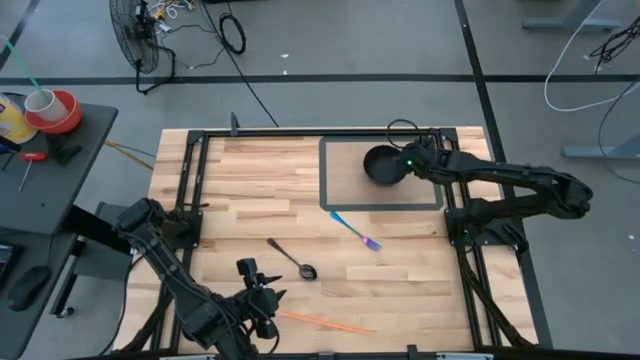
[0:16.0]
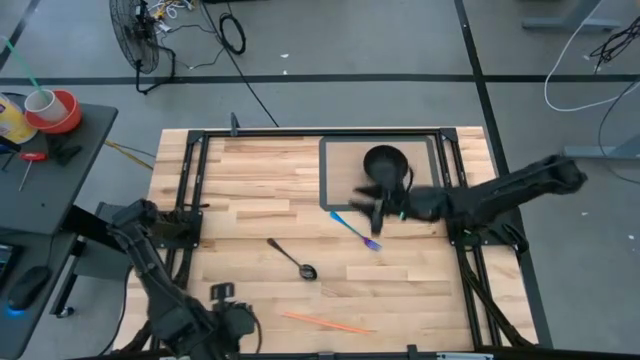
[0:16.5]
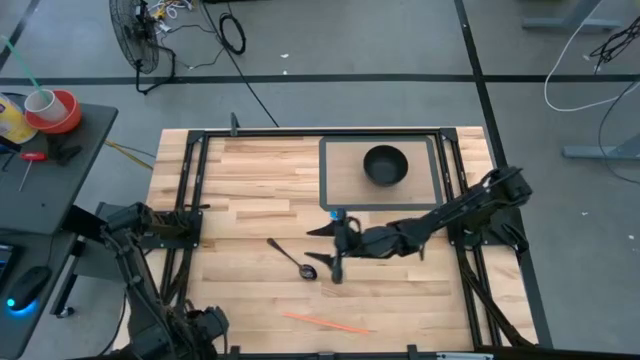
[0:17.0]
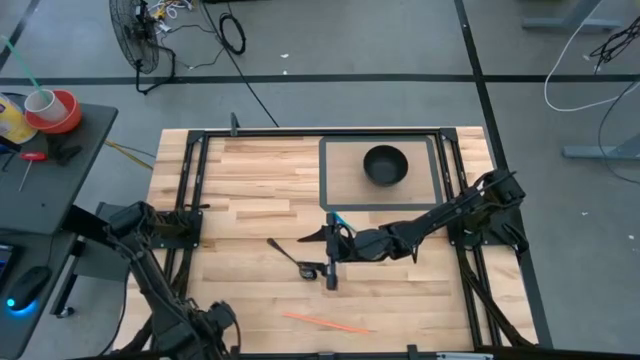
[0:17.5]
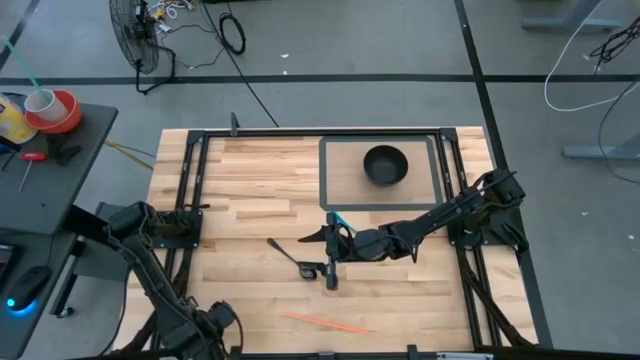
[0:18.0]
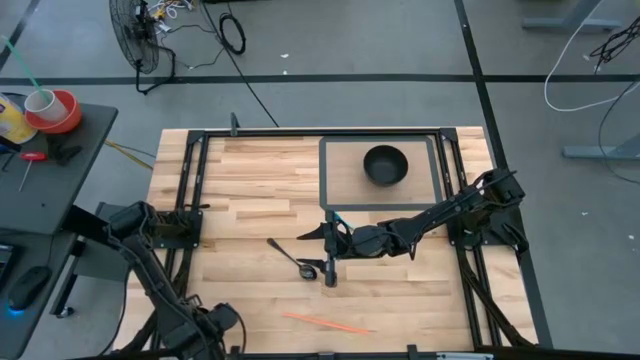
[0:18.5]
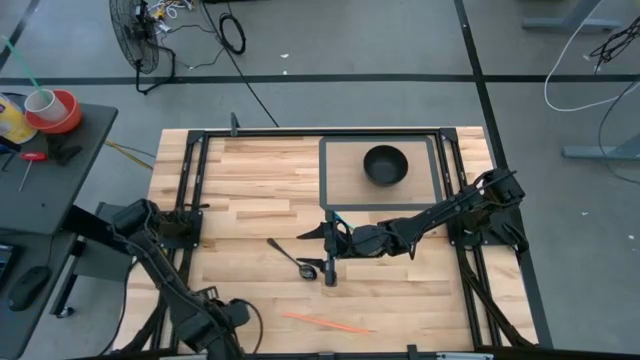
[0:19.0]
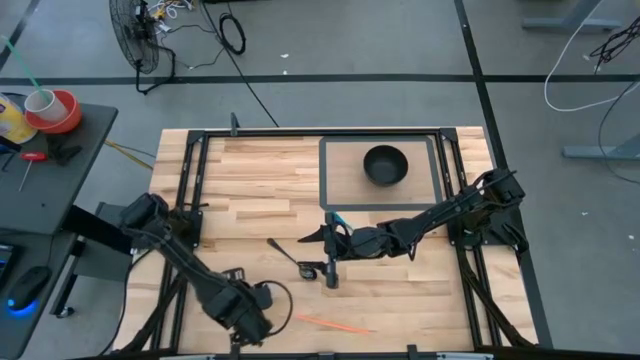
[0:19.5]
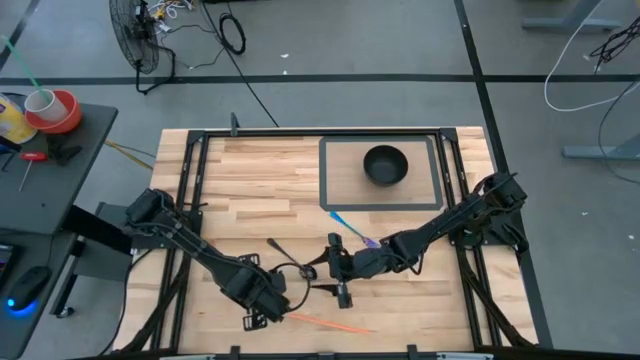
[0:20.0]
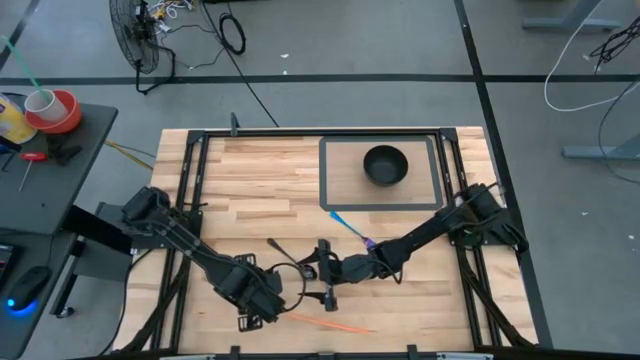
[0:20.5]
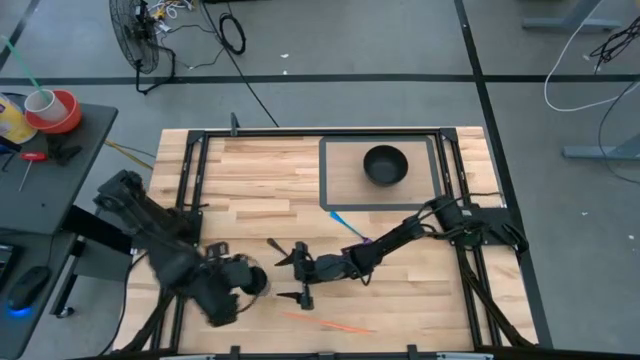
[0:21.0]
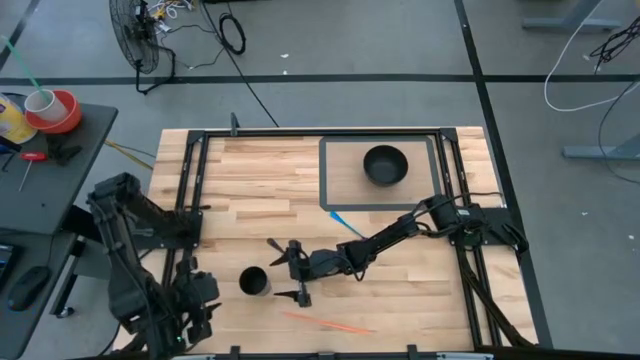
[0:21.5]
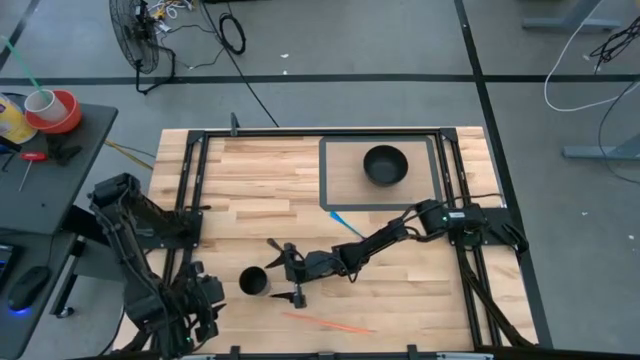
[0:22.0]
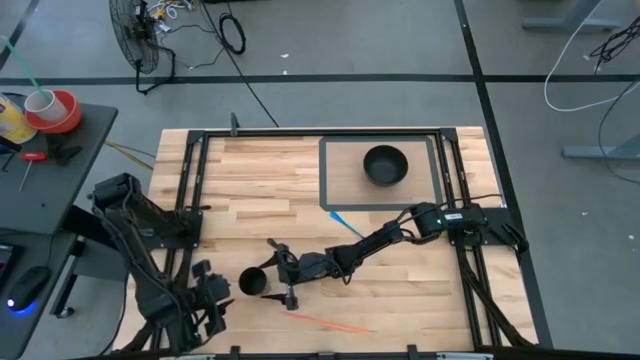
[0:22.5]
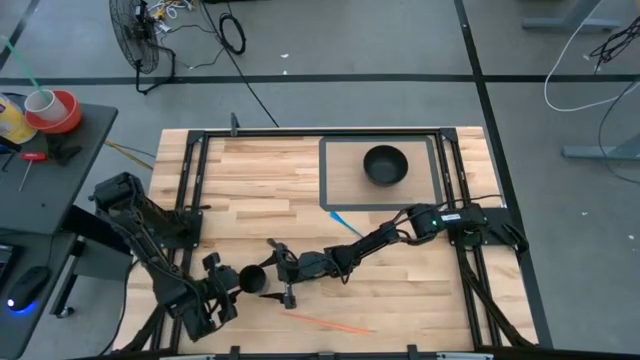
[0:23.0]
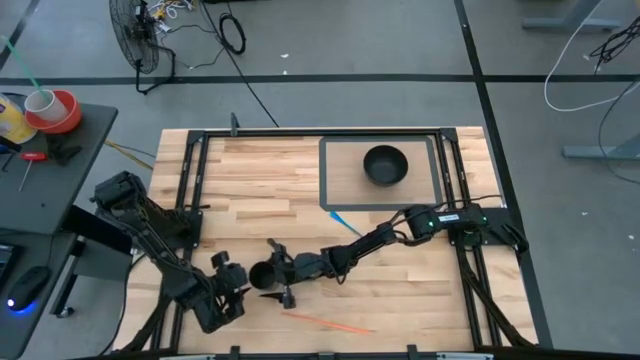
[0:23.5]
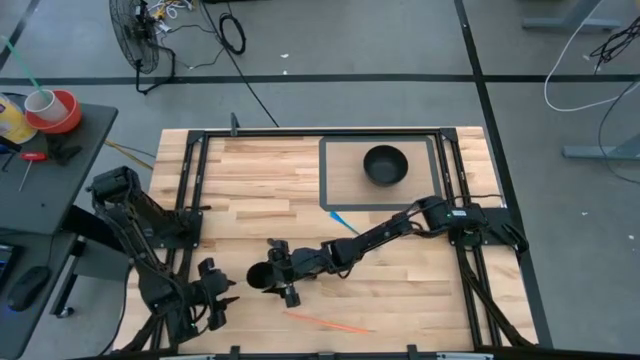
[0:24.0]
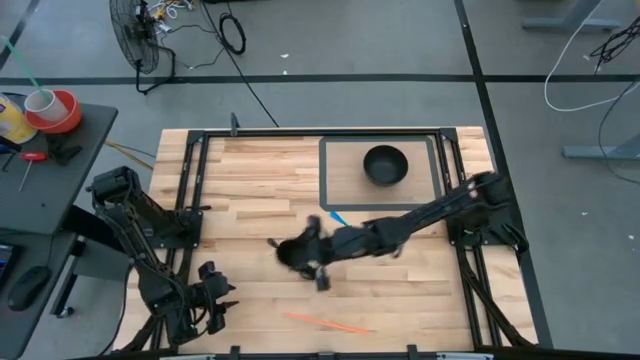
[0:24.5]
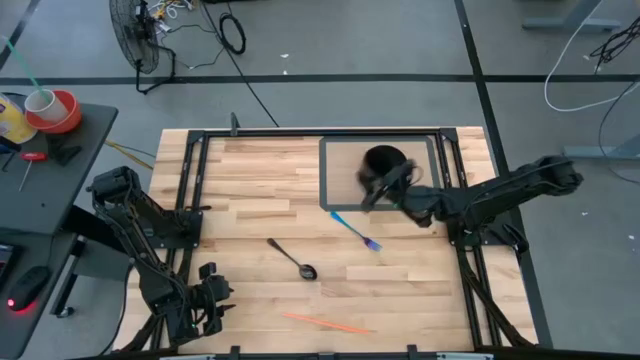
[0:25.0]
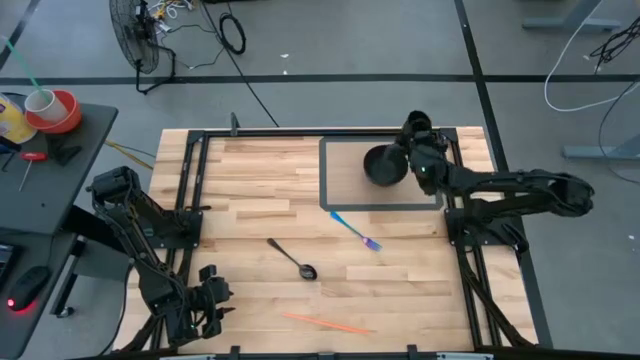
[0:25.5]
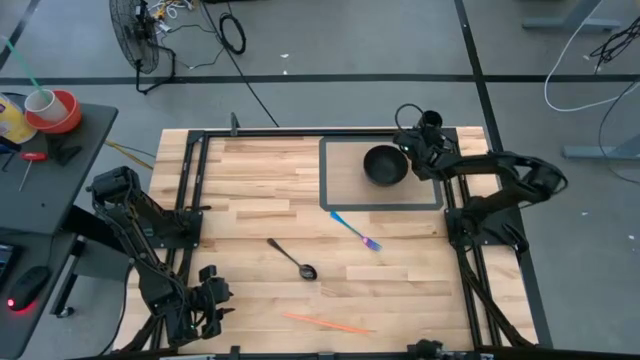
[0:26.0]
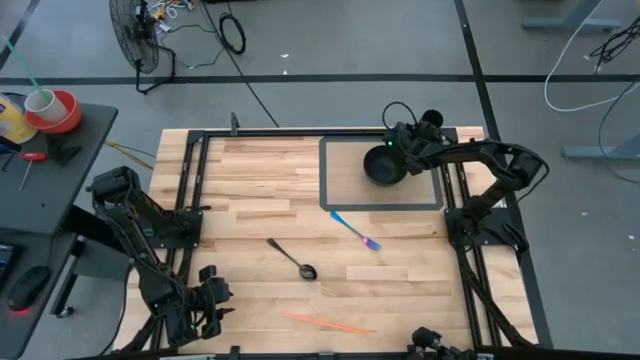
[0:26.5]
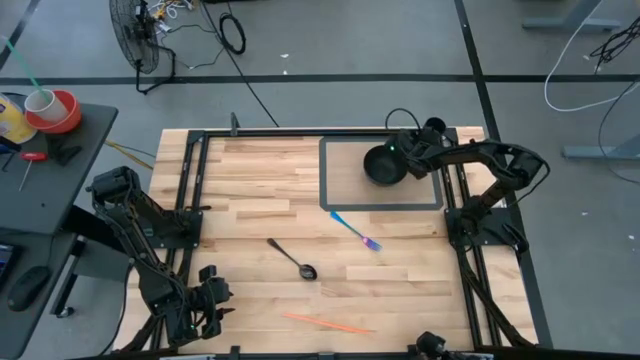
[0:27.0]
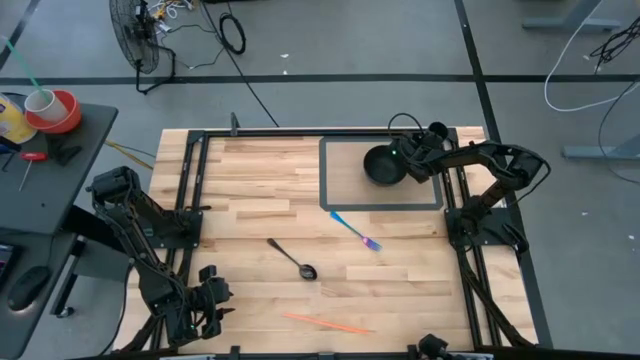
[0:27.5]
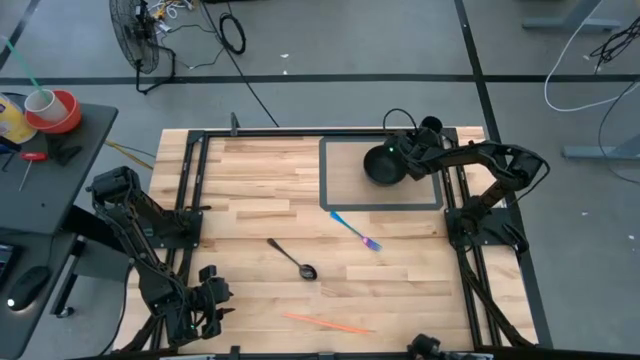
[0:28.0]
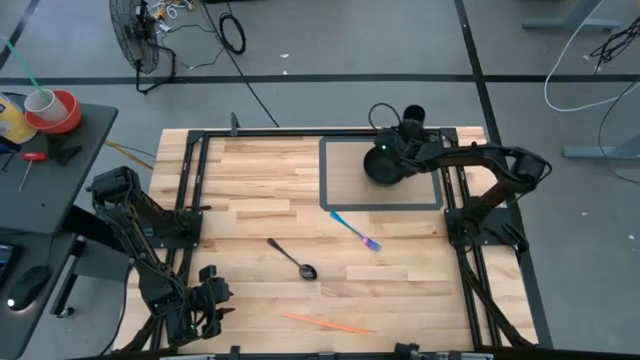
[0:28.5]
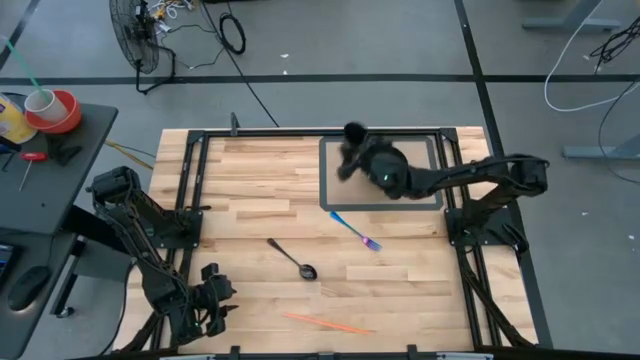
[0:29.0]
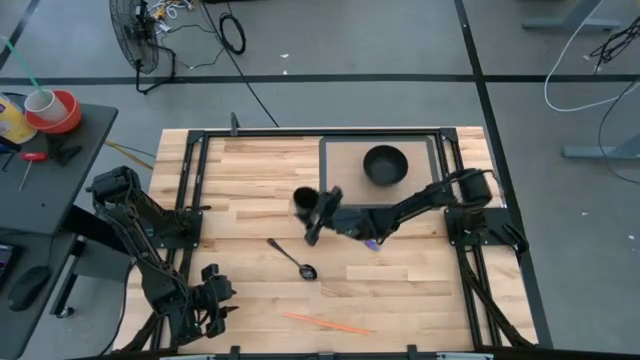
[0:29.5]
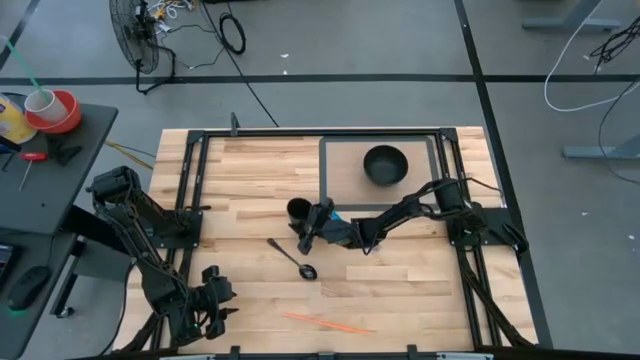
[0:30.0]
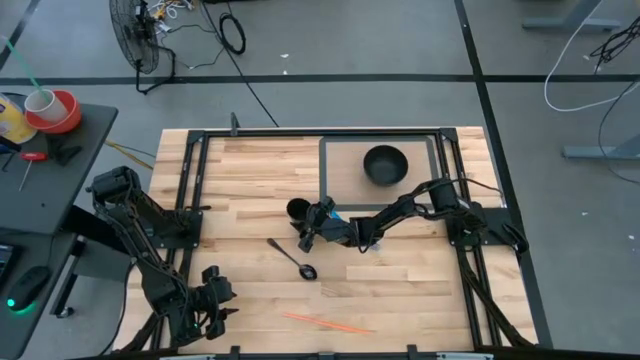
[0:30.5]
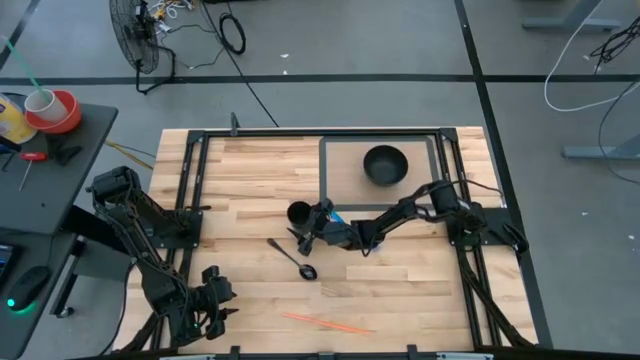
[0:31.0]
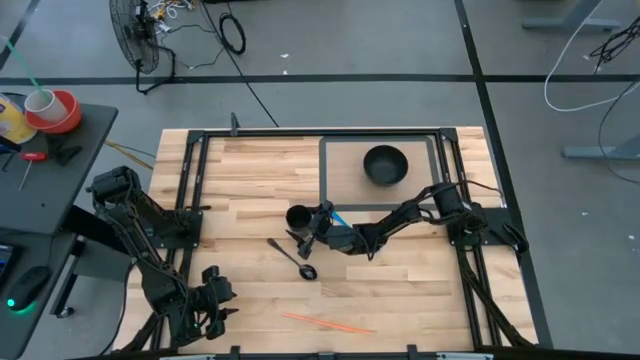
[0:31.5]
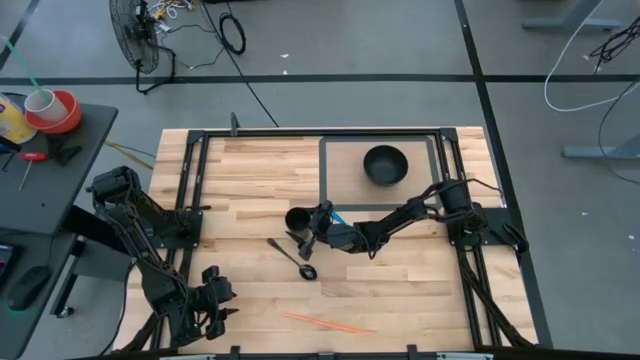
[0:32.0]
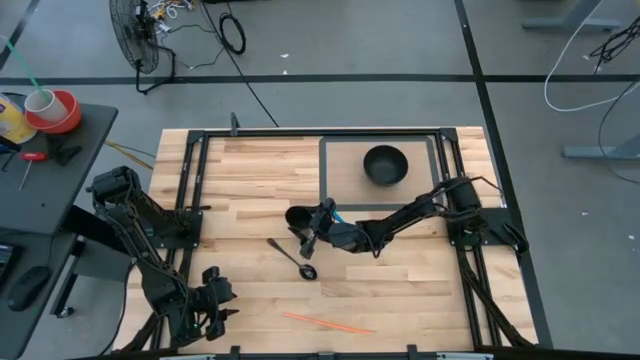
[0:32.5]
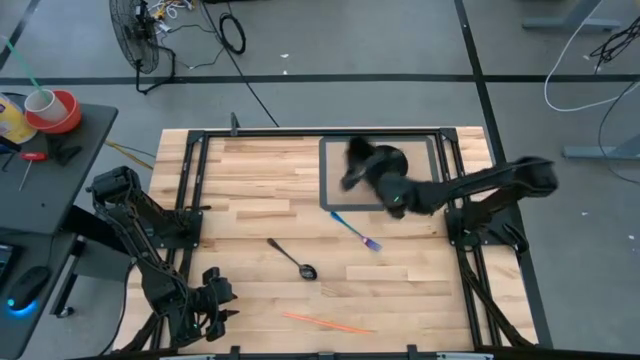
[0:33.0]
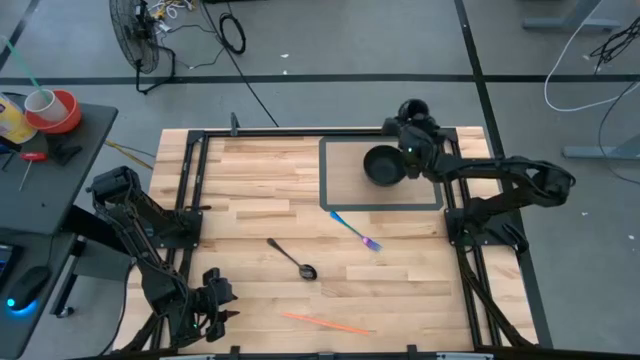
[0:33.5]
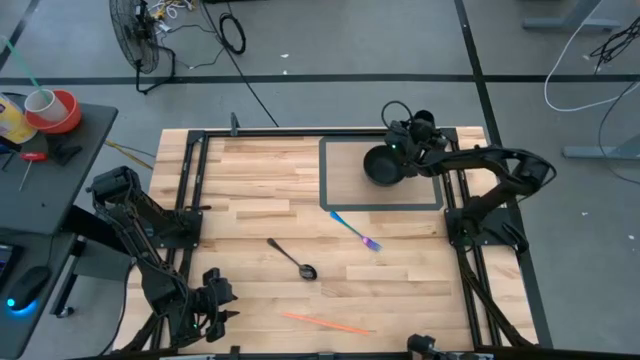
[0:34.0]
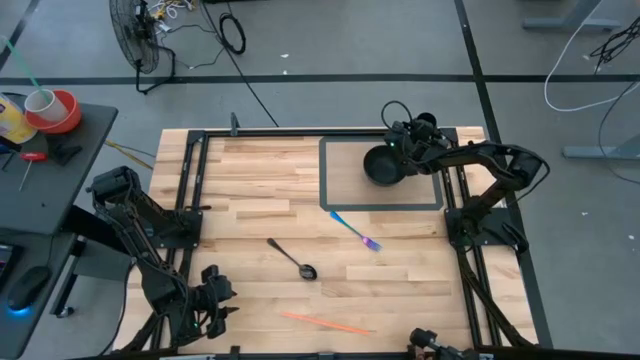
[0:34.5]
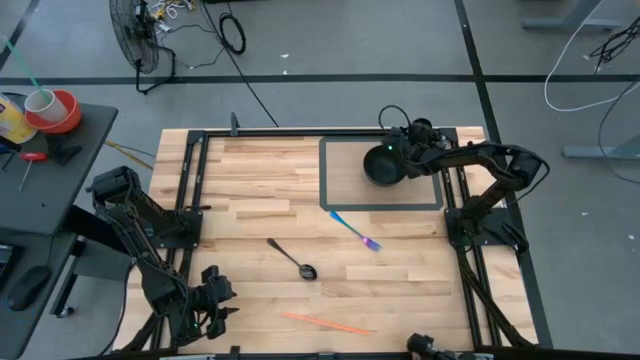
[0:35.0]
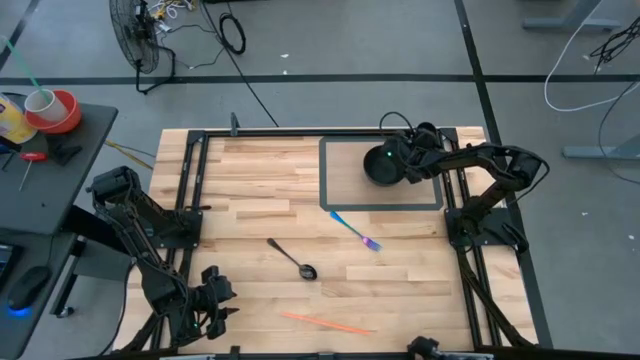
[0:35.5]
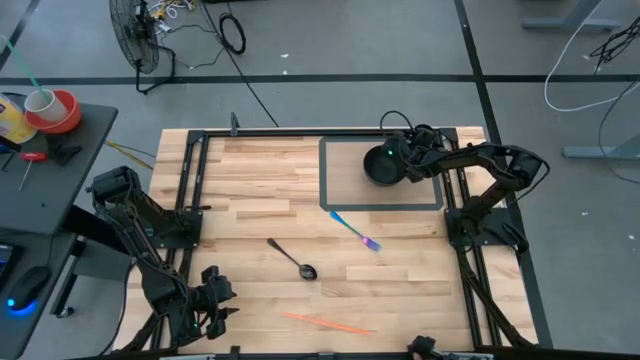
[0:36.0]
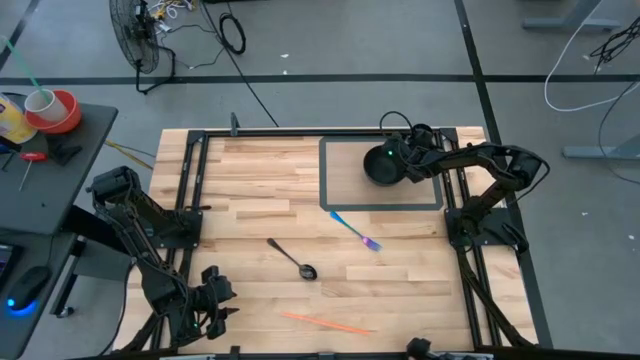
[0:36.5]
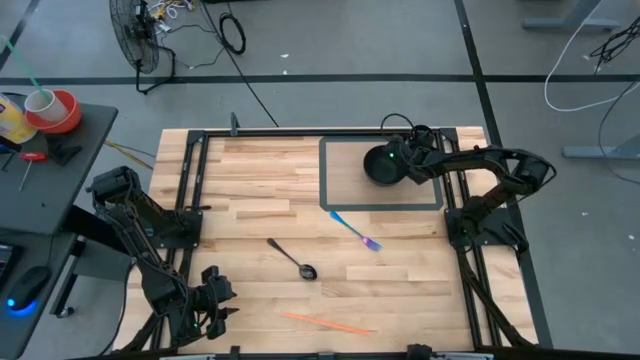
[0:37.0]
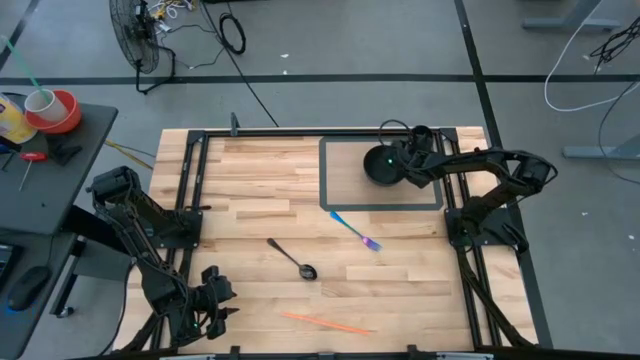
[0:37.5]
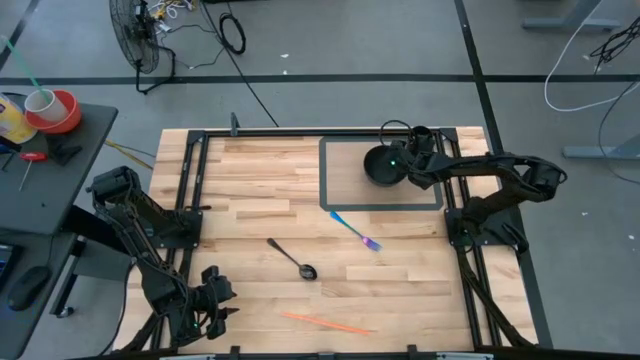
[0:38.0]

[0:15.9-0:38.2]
Task: Pick & Place Utensil
Put the black cup on the transparent mat to the top right of the black bowl
